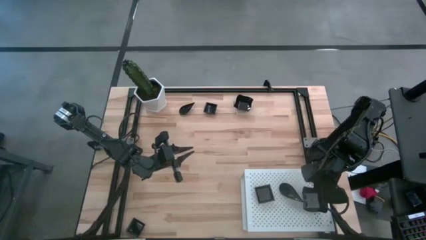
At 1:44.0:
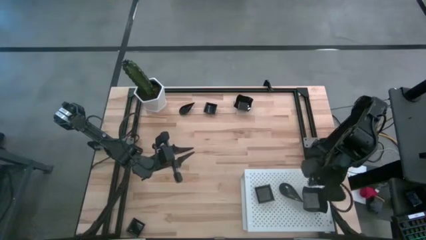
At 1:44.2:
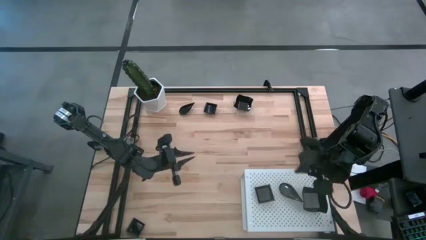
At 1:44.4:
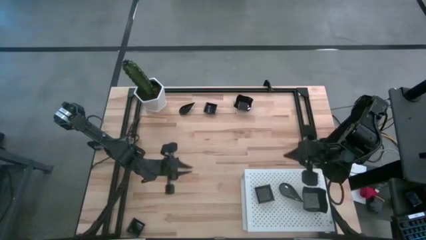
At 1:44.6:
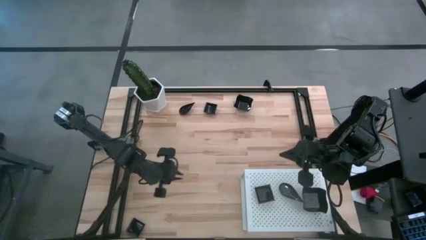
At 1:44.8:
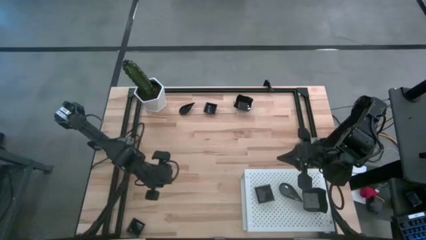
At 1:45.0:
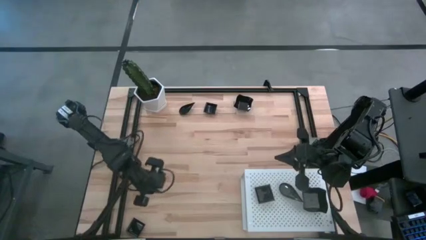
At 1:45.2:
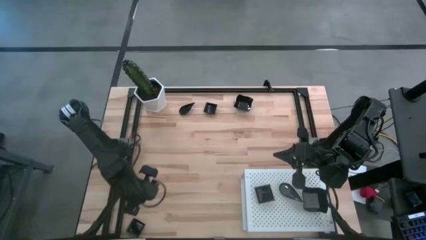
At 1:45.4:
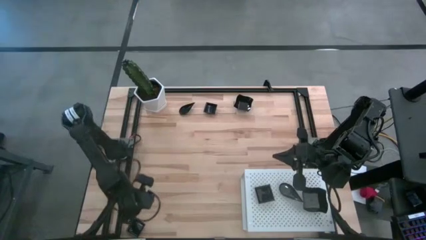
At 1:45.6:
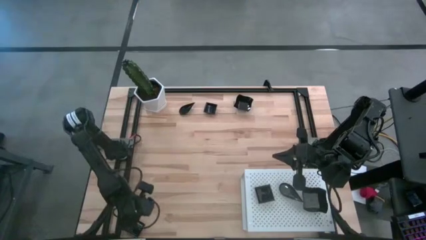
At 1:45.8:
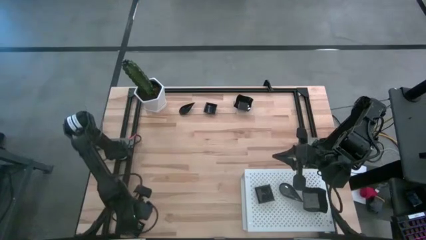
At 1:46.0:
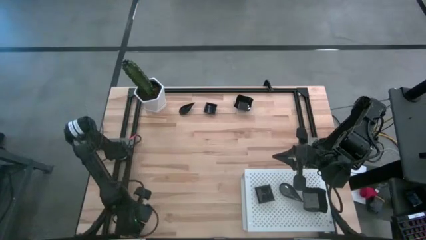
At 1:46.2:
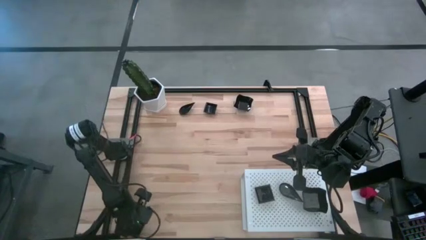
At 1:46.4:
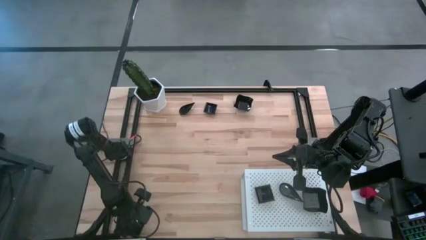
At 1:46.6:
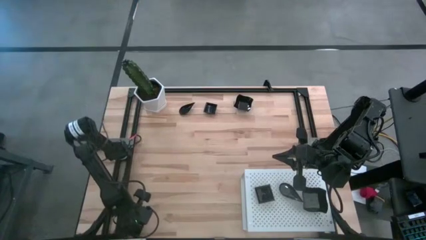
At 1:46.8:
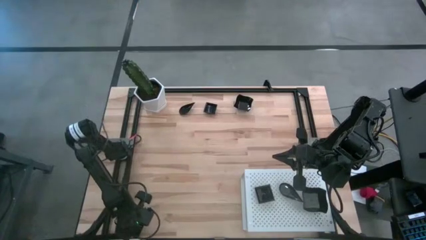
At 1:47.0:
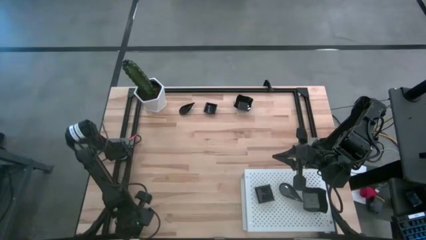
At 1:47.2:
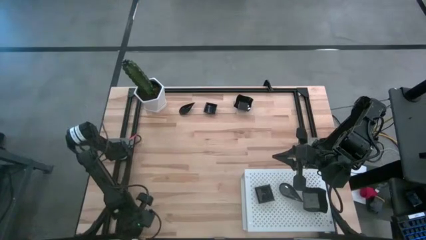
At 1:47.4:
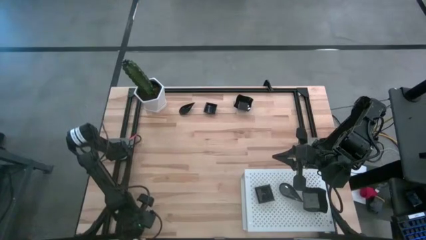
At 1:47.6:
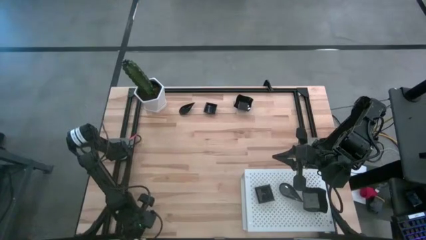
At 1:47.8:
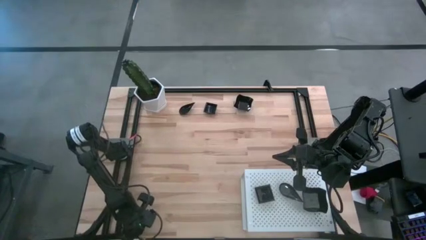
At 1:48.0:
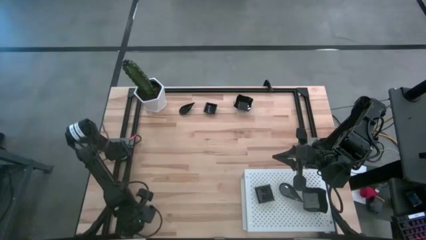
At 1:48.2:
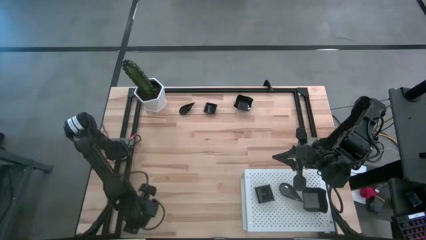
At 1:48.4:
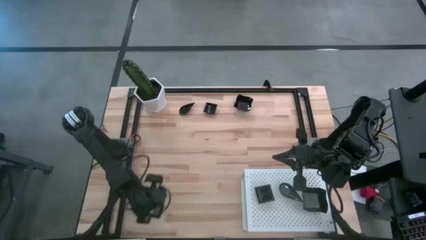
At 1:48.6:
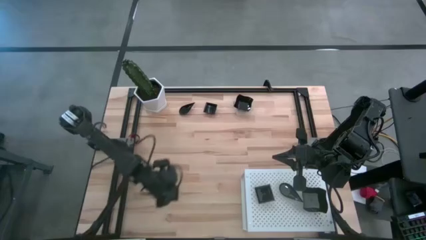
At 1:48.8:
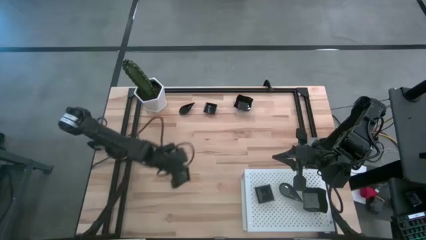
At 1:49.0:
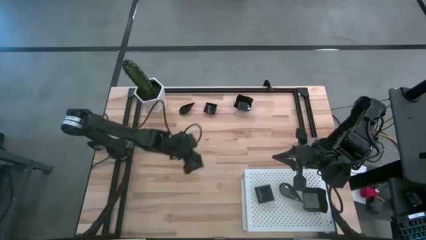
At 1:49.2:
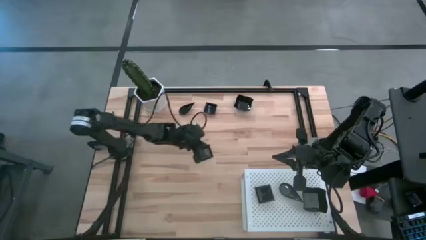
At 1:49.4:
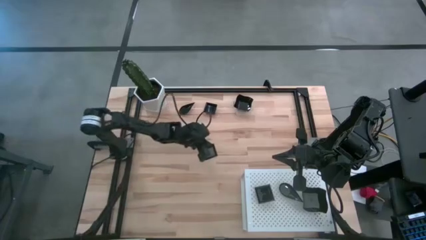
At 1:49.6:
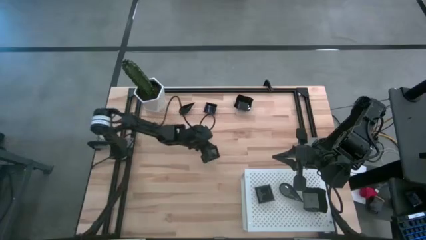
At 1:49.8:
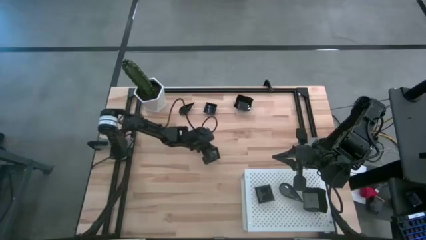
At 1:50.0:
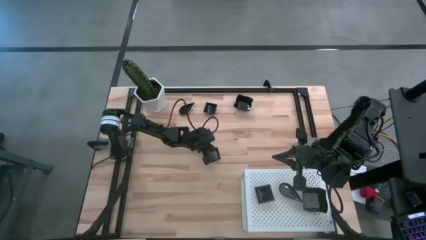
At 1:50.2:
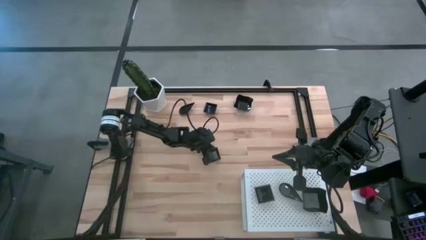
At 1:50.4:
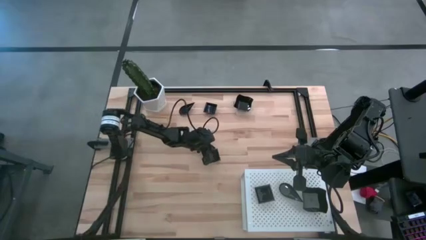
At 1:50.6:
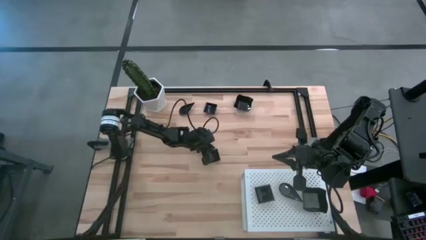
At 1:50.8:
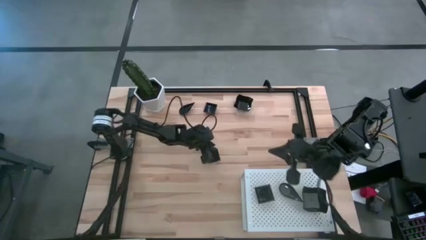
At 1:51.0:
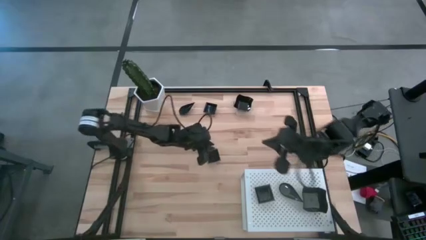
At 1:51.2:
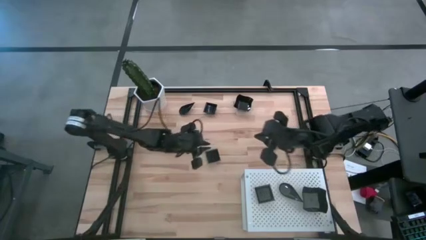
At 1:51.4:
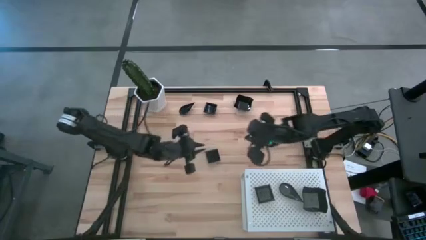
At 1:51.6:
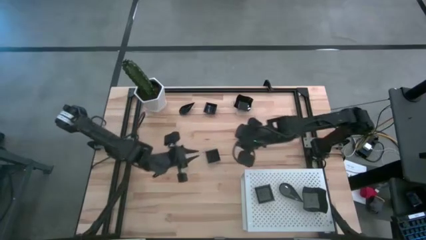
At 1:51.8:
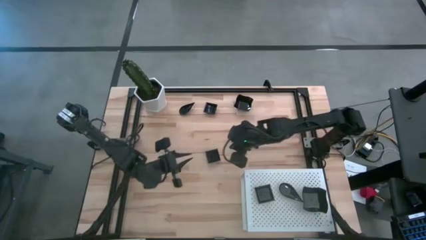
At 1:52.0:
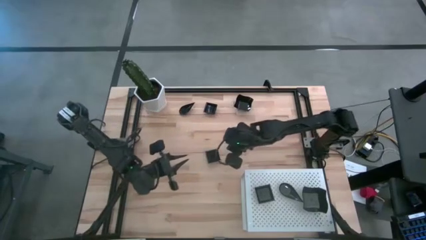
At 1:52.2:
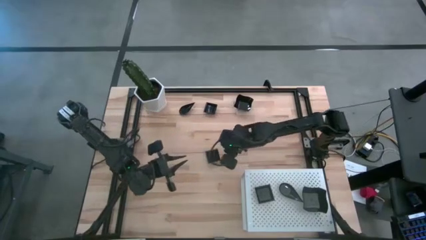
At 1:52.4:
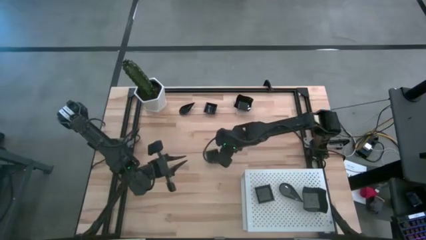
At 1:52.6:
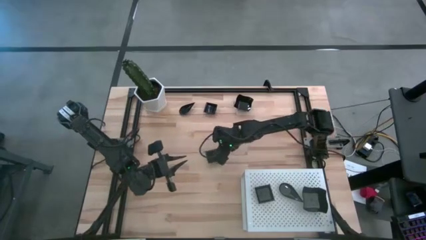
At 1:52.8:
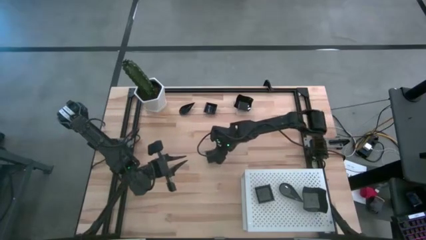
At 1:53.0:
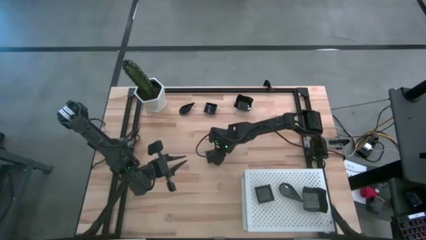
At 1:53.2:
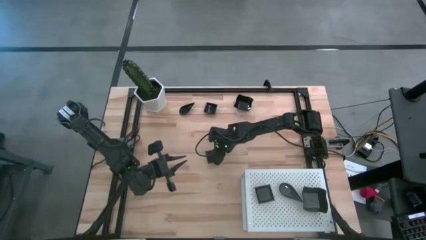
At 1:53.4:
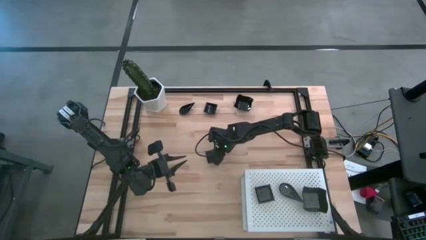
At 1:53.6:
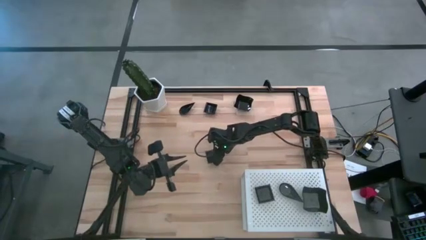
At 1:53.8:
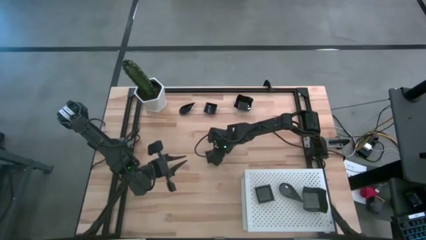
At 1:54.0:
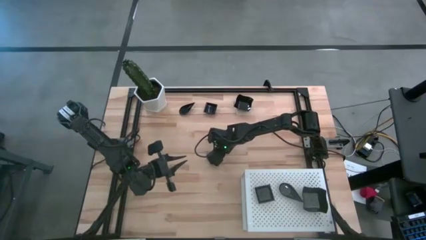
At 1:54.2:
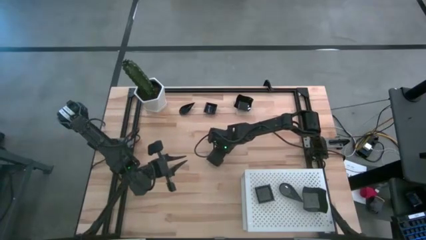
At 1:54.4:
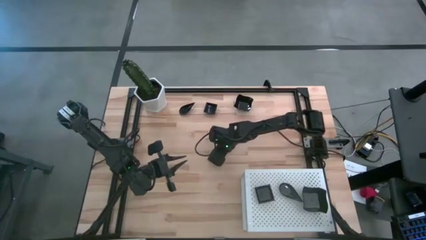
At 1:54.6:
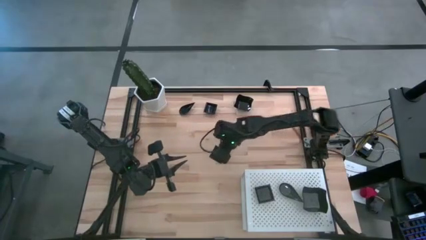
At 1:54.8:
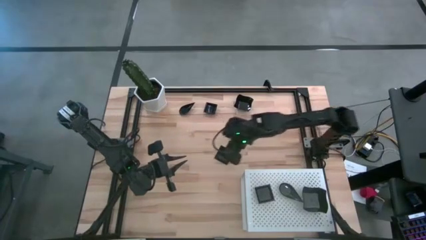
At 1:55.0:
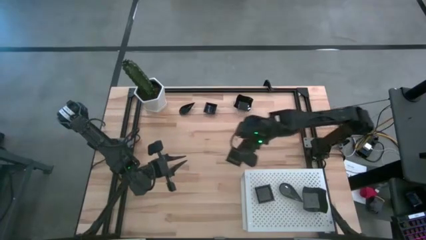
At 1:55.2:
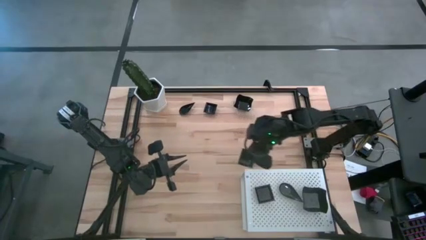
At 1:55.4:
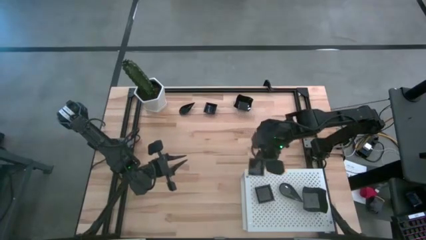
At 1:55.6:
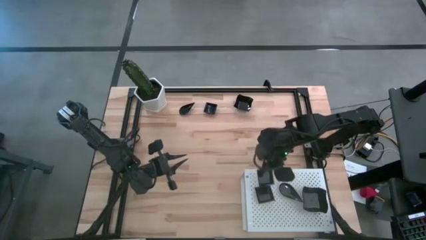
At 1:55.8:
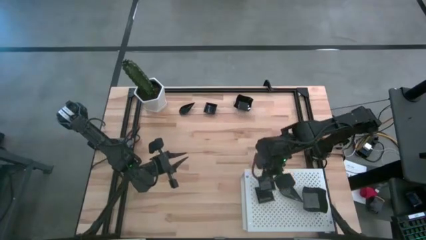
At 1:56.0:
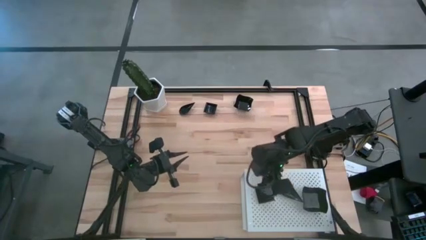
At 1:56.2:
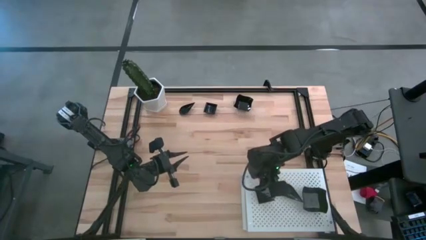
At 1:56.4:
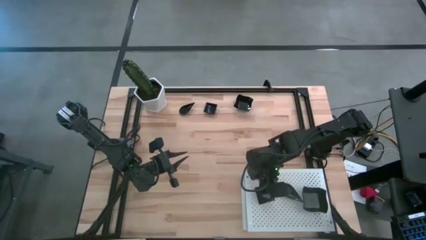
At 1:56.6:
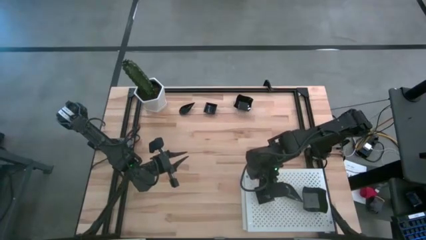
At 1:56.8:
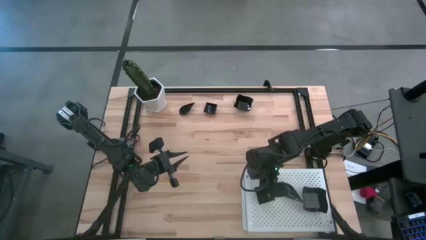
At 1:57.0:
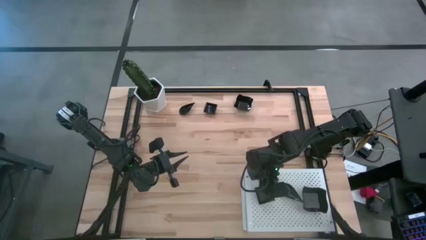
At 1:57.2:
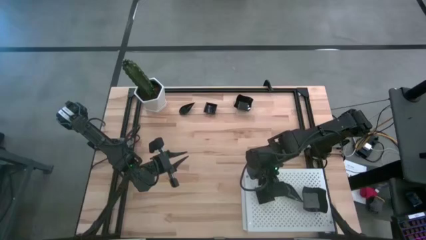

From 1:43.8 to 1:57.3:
Task: Pick & Place Mini shaped plates
Stack the square plate on top of the other square plates on the shelf

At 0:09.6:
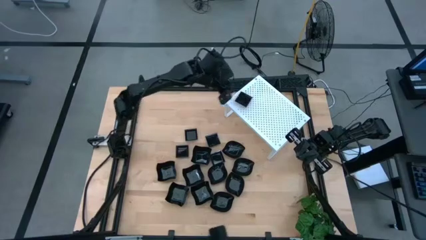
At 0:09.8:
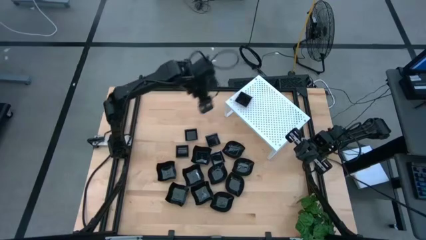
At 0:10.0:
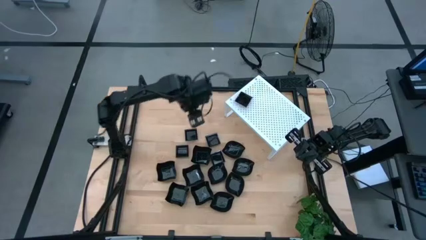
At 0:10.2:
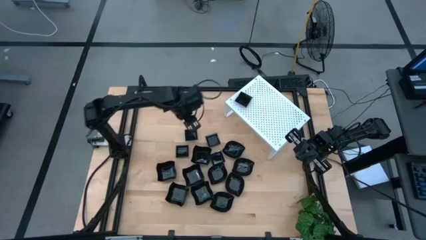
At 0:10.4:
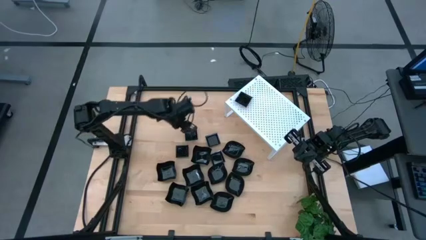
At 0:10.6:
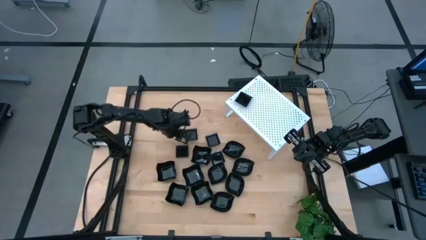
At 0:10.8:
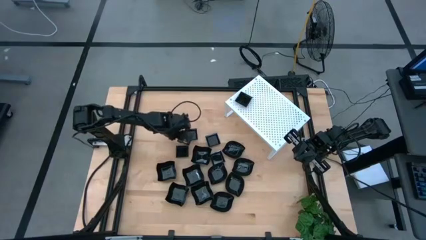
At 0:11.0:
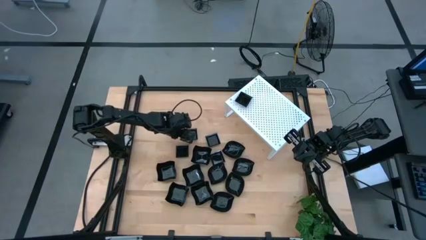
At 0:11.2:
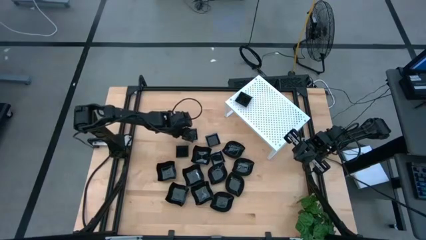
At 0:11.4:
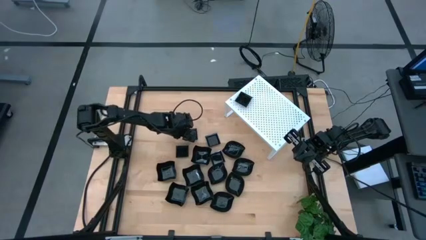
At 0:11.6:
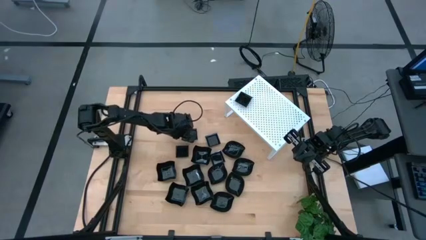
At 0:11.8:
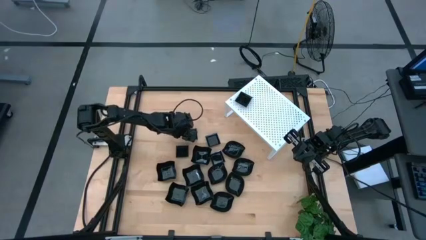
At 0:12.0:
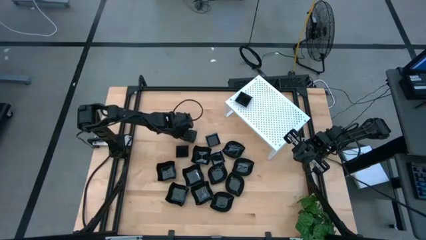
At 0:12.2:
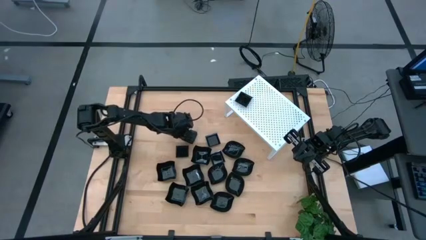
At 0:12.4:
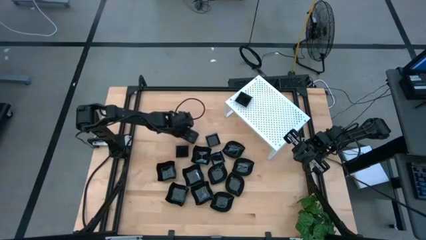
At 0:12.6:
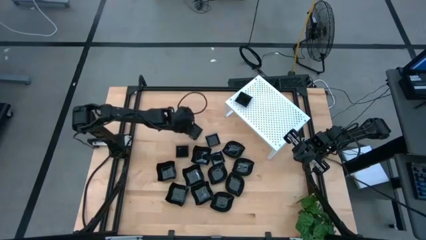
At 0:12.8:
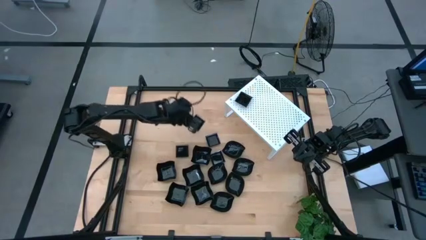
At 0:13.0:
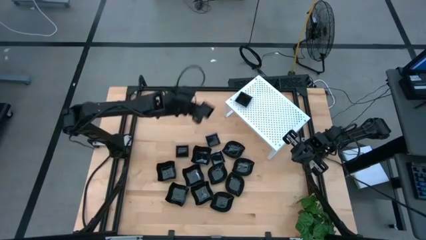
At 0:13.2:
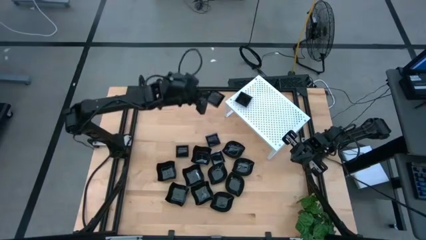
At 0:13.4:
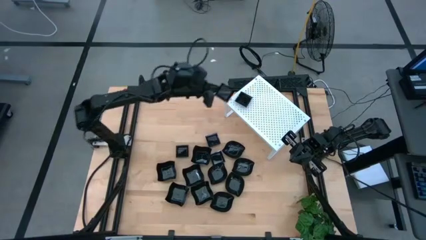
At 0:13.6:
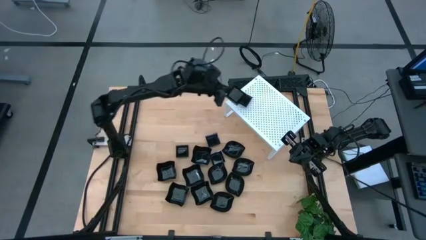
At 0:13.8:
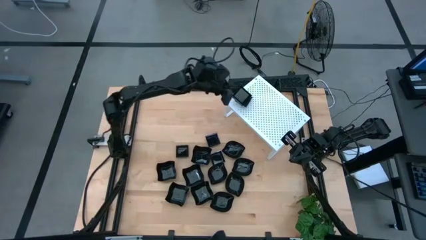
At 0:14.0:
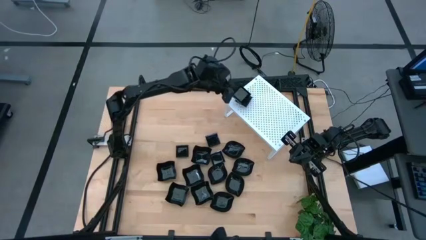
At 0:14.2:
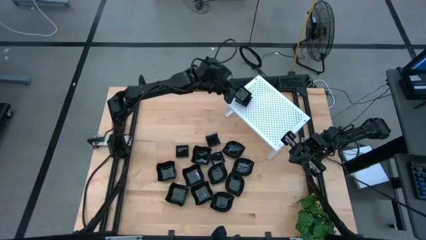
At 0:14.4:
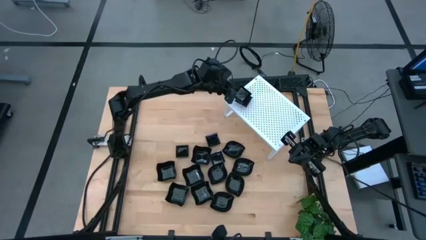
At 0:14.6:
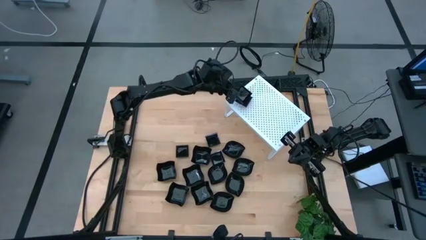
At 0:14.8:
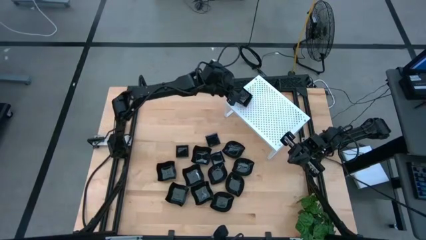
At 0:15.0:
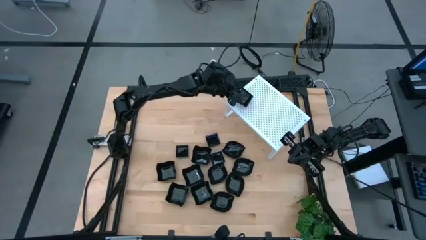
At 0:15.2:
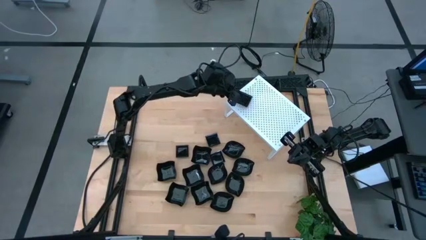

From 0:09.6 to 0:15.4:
Task: Pick & Place Mini shaped plates
Stack the black square plate on top of the other black square plate on the shelf
